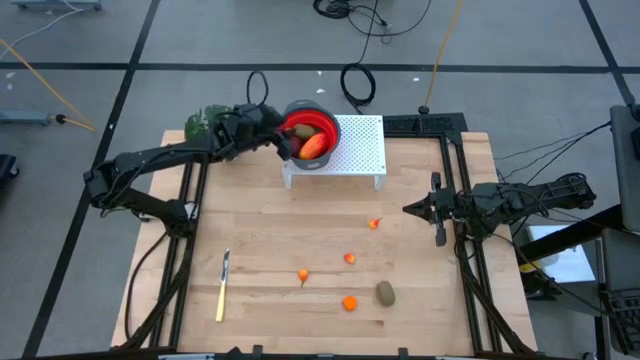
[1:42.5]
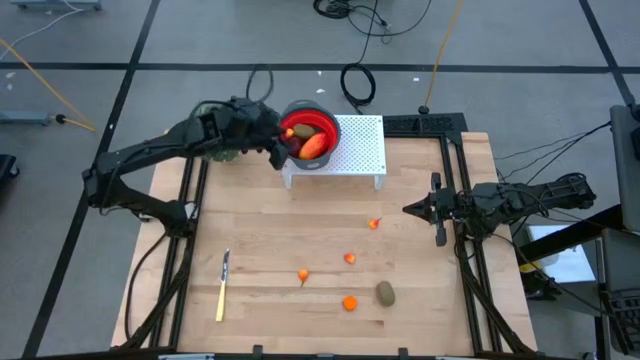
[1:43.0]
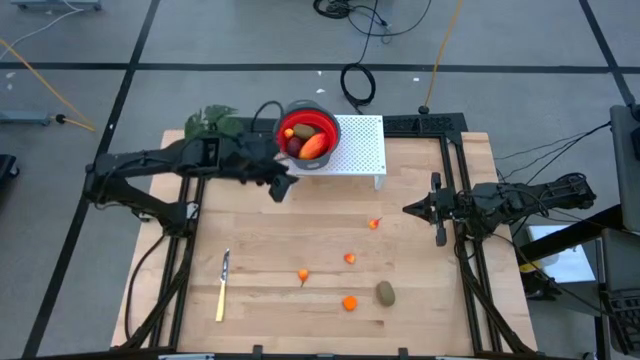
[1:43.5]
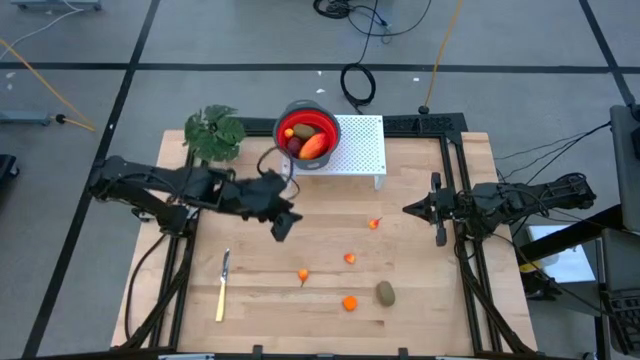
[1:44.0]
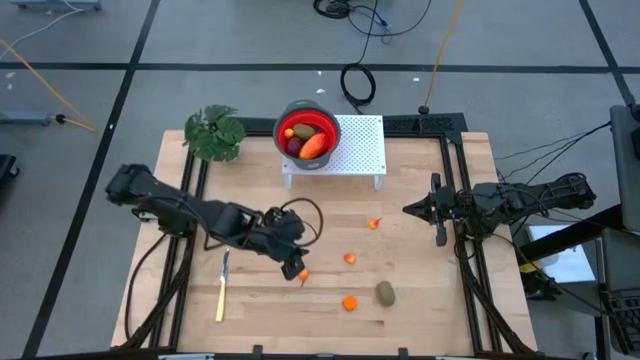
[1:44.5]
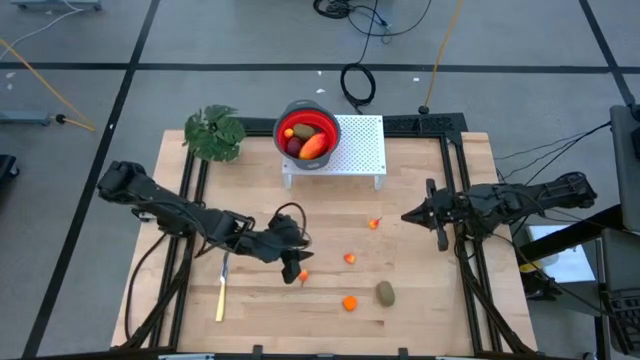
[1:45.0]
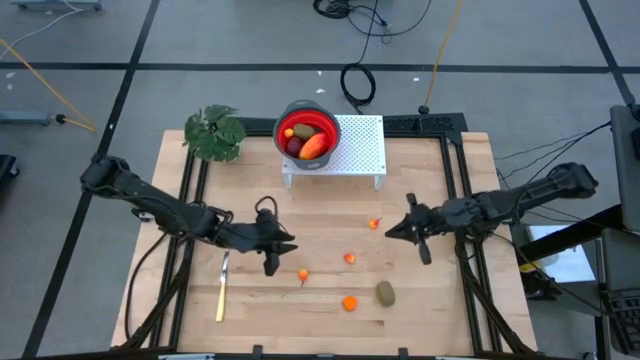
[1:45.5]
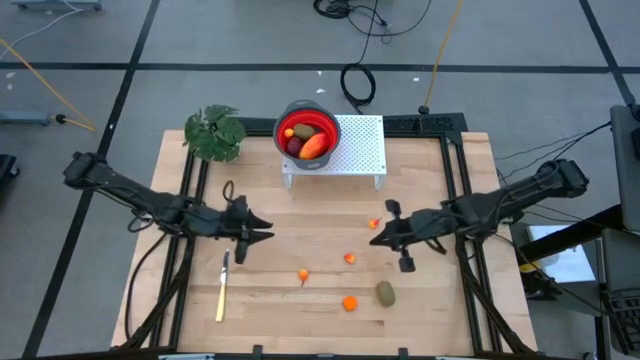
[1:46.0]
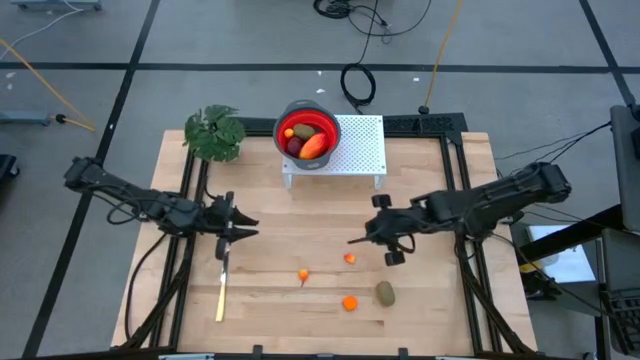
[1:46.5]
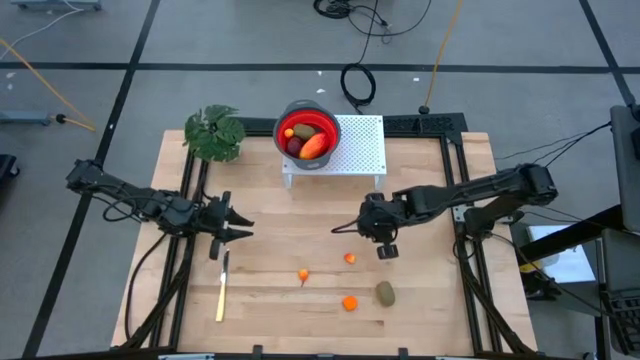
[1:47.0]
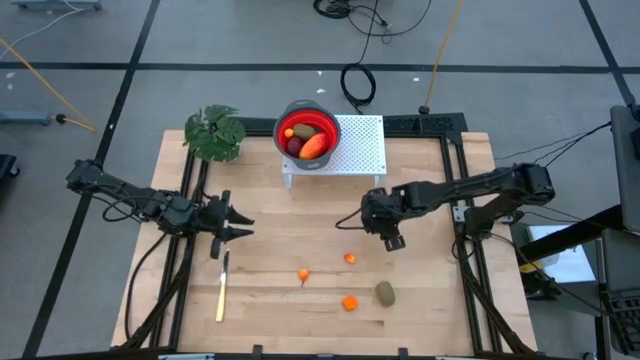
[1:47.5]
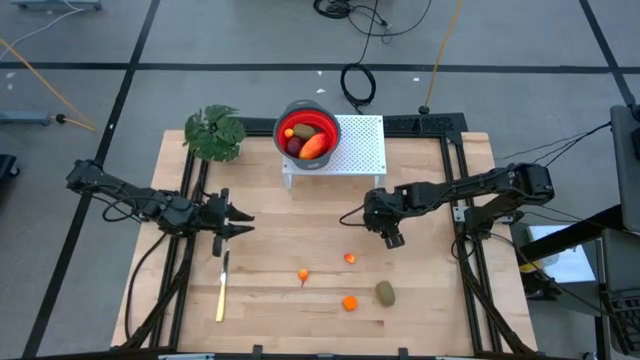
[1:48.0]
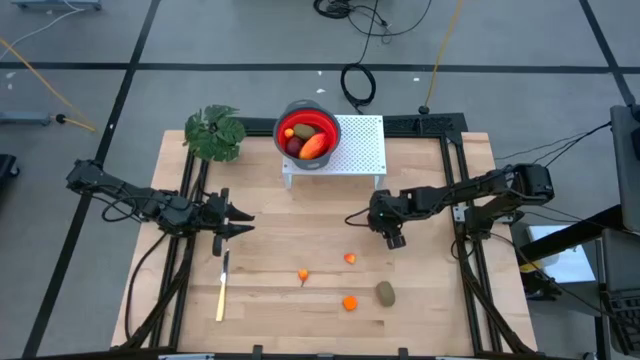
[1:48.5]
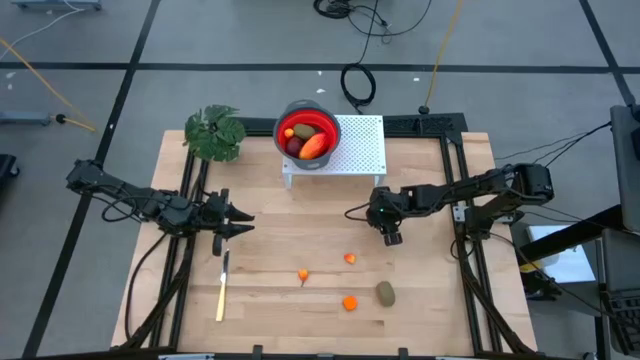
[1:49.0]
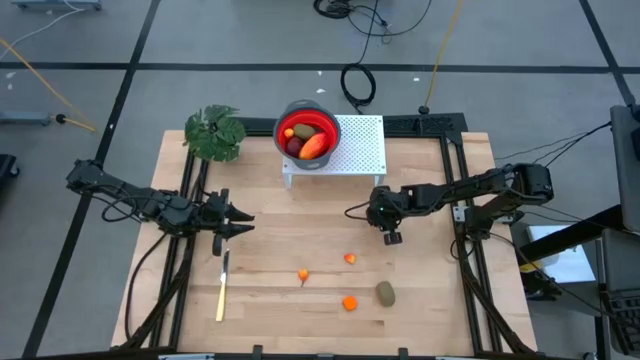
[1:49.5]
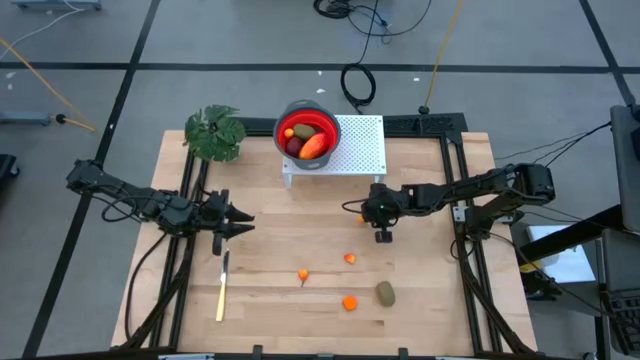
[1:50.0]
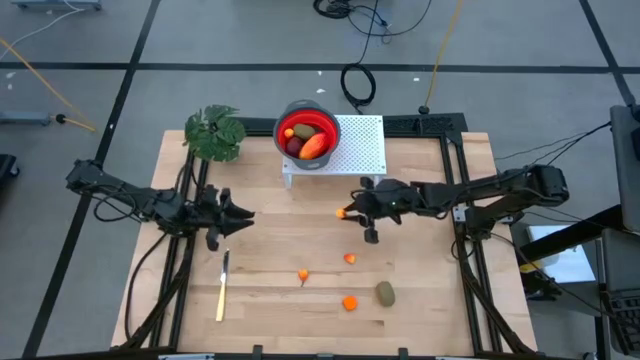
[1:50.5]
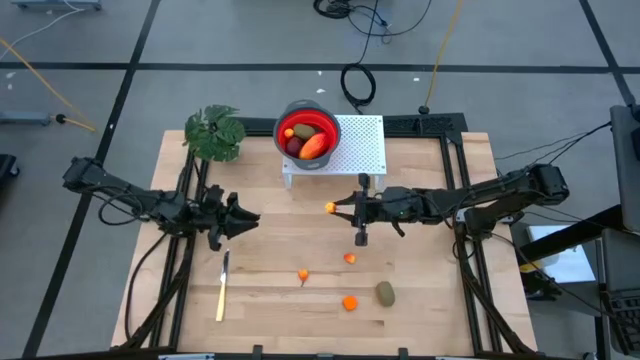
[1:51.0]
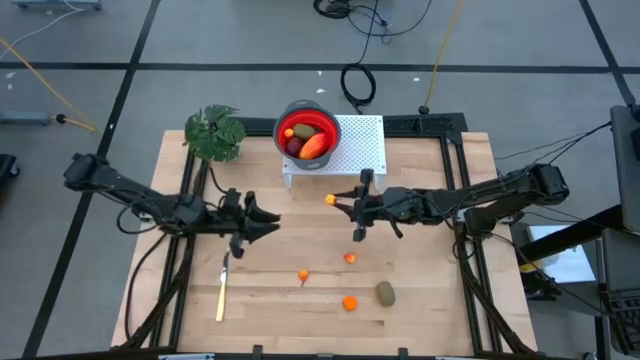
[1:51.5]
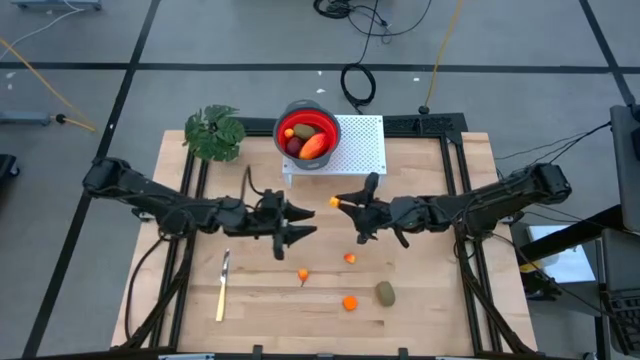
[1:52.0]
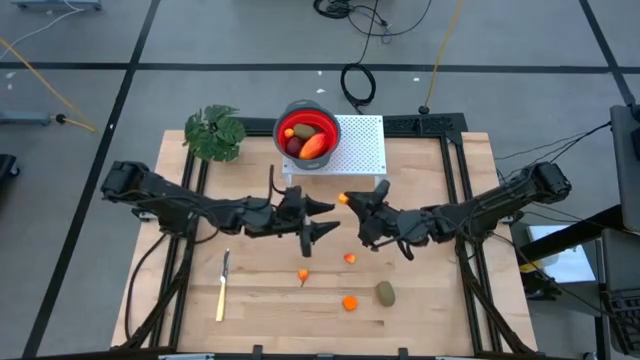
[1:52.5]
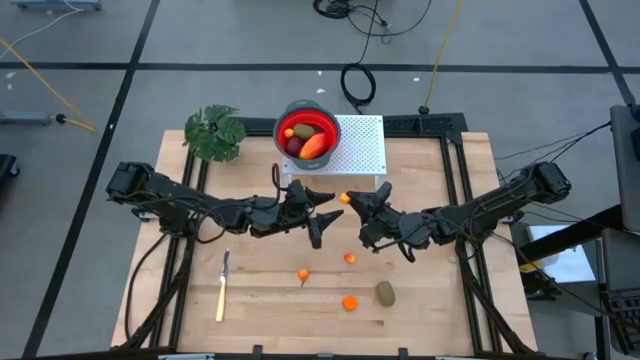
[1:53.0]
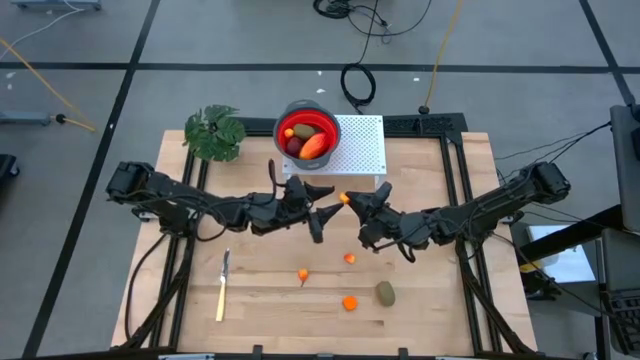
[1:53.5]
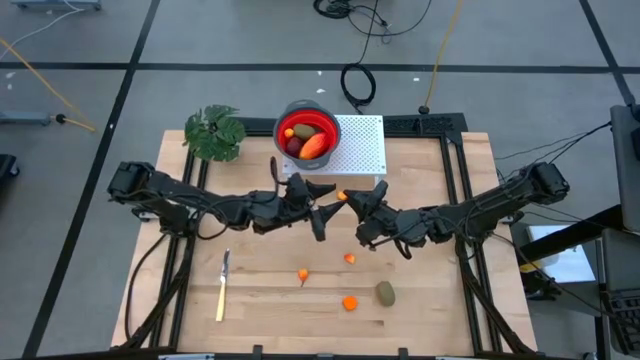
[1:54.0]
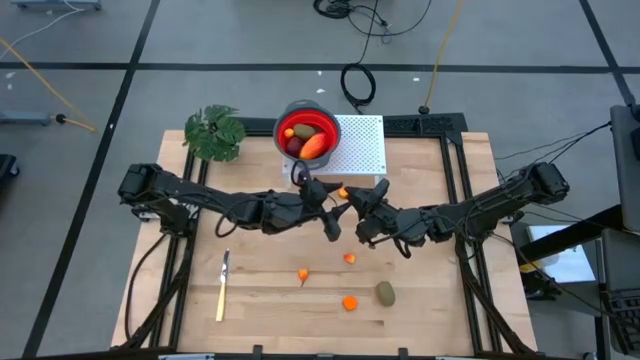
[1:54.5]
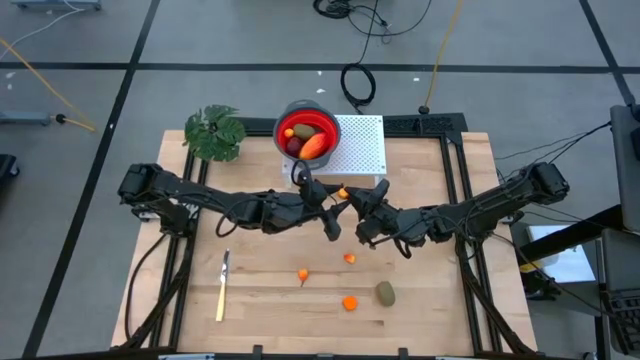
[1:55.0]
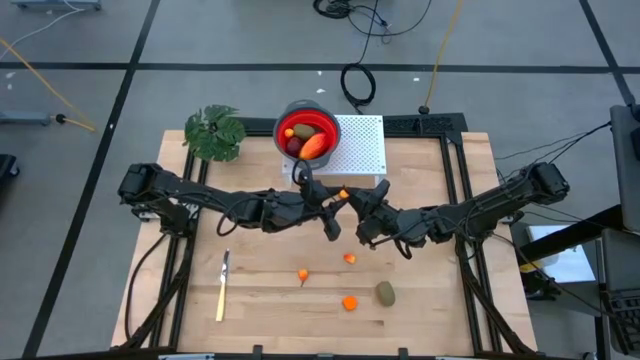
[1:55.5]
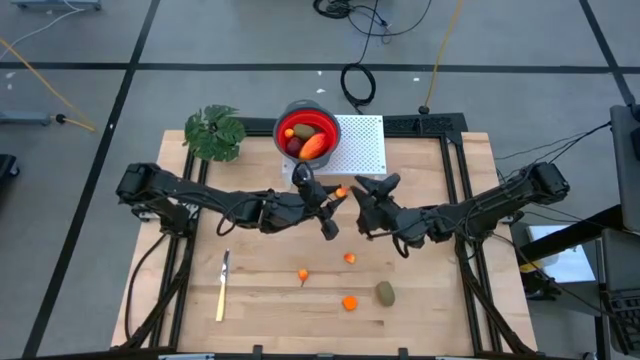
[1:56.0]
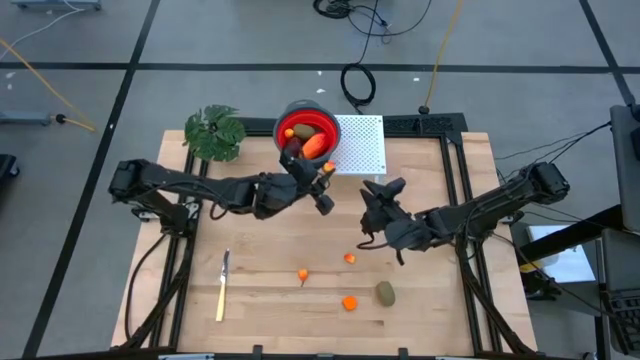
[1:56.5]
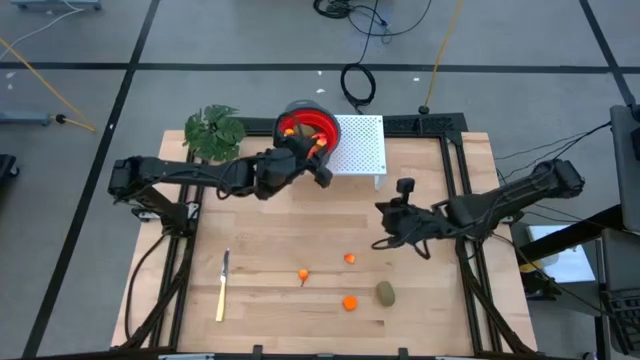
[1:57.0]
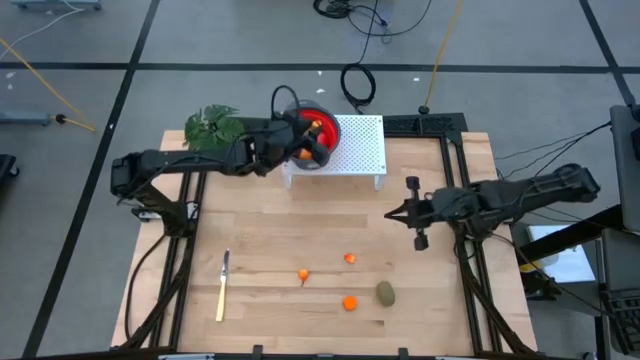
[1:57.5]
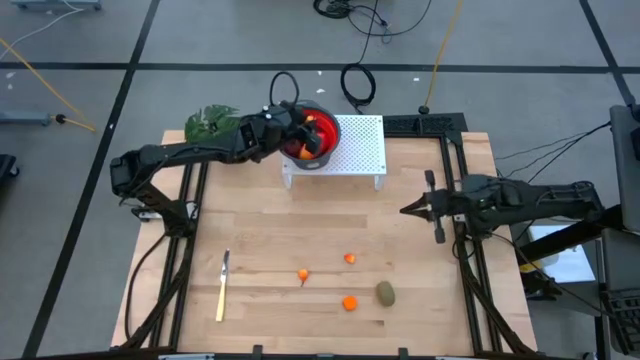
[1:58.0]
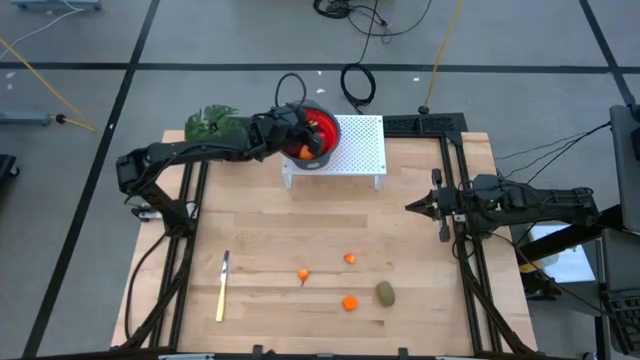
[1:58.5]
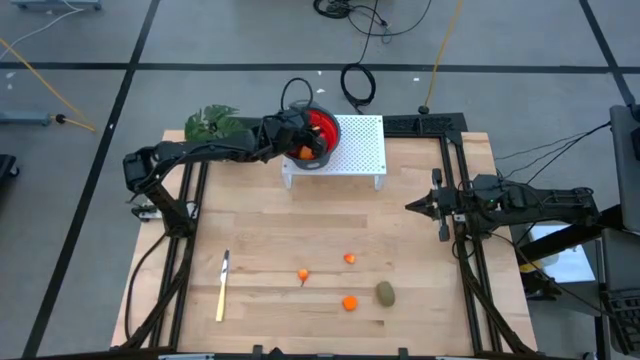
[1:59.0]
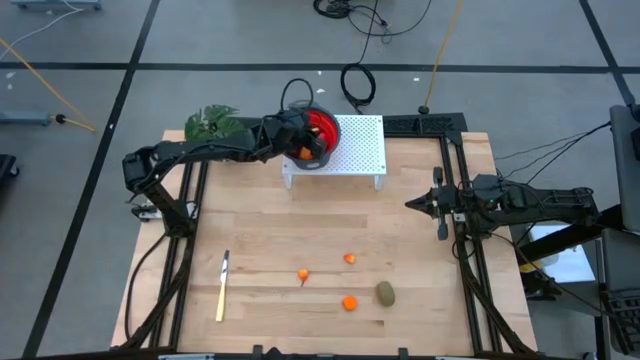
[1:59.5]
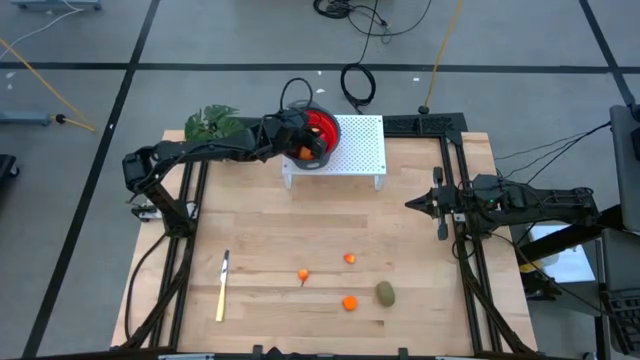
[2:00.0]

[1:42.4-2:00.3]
Task: Pick & Place Fruit
Put the pear into the red strainer bowl on the shelf

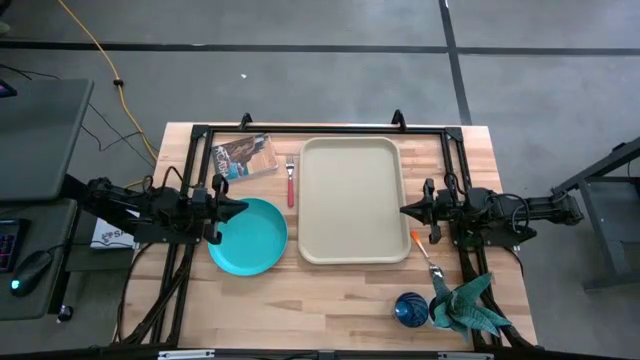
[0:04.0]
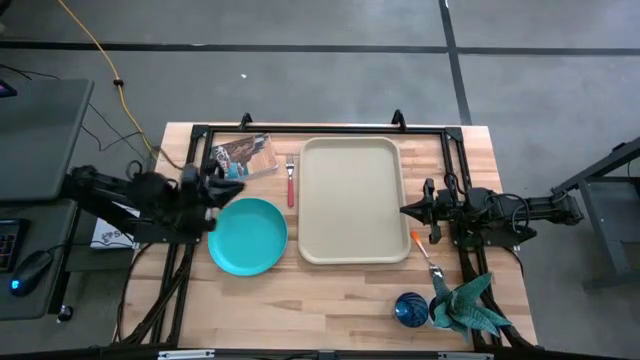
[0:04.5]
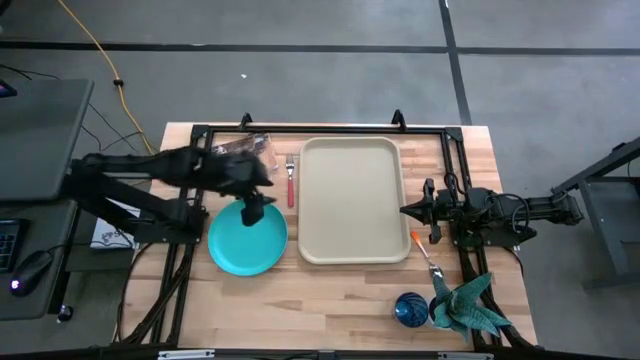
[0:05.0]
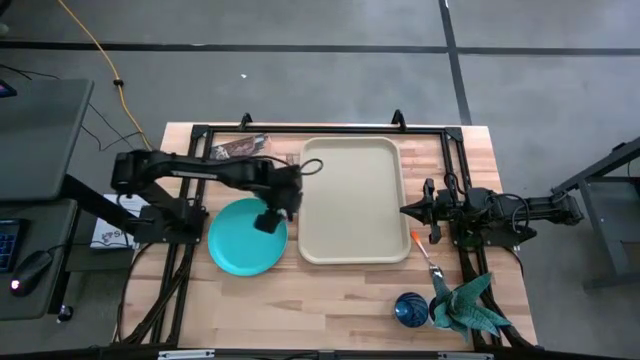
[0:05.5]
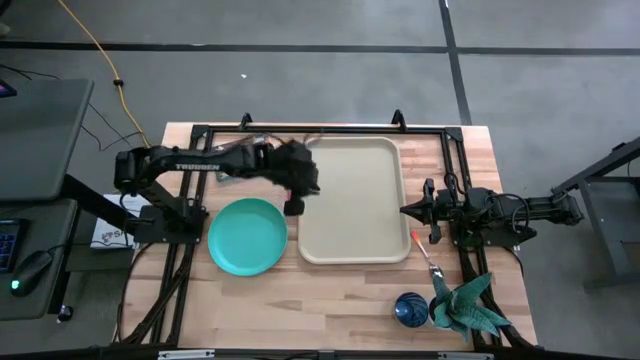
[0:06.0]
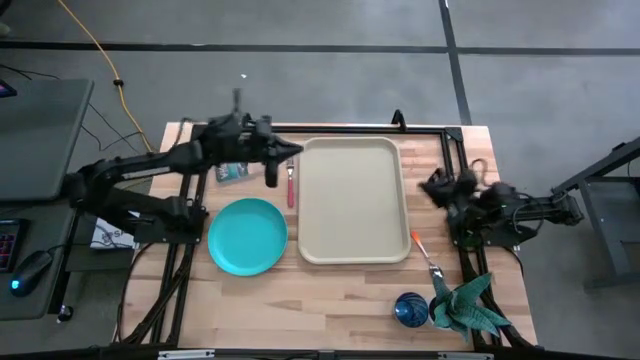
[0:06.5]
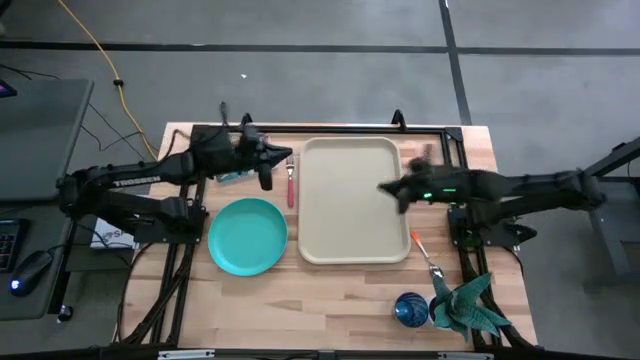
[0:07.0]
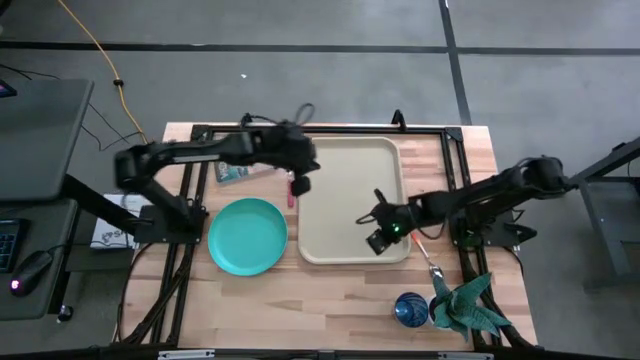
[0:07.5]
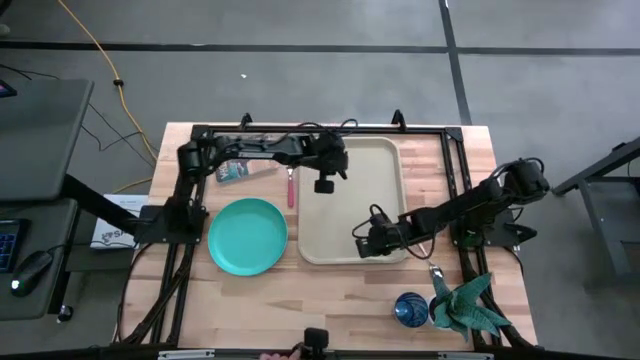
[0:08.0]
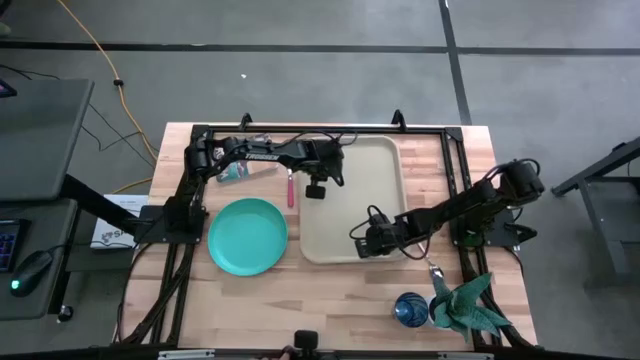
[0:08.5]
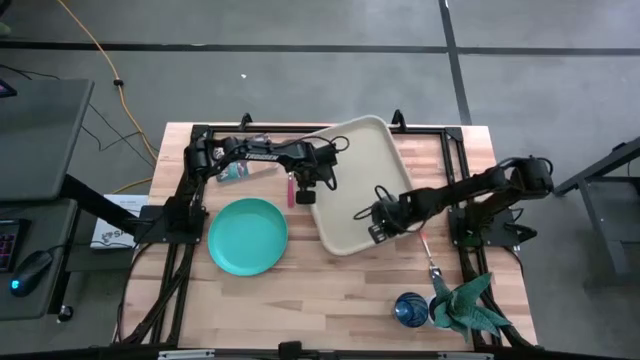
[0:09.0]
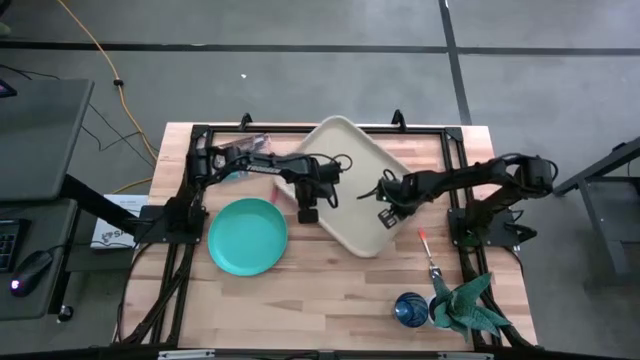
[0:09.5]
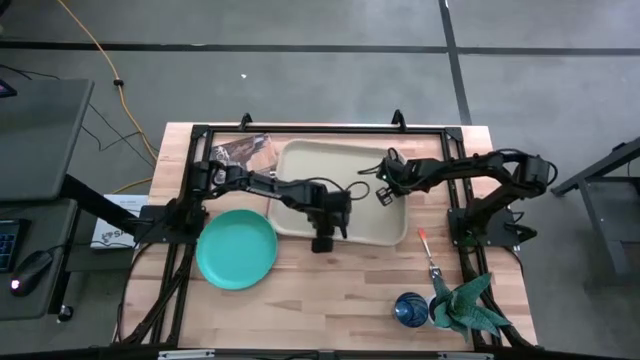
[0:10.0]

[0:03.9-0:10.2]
Task: Pick and place plate/cup/fork/spoon on tray
Adjust the gray tray on the table
